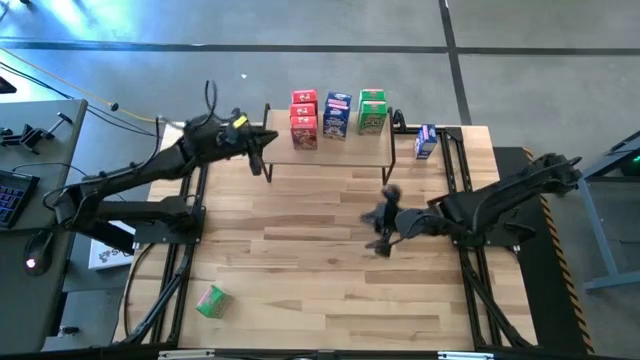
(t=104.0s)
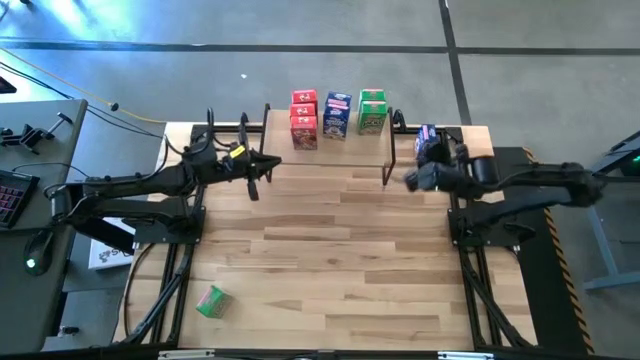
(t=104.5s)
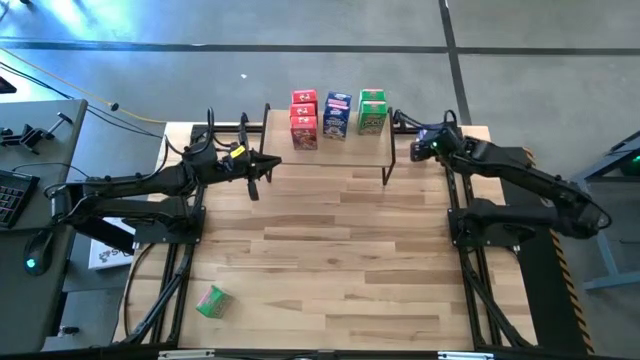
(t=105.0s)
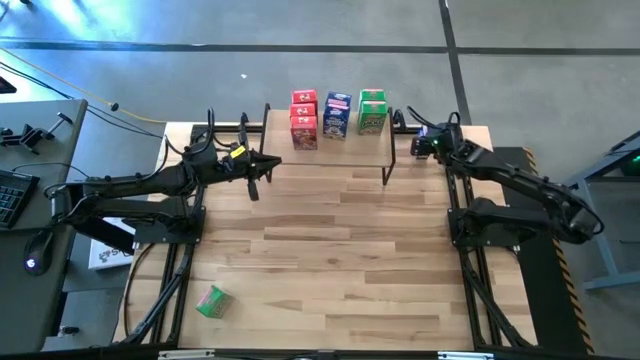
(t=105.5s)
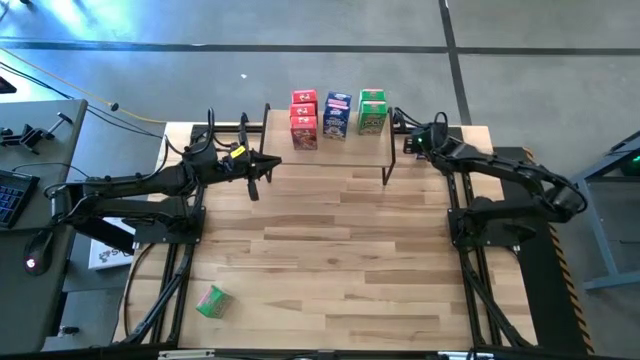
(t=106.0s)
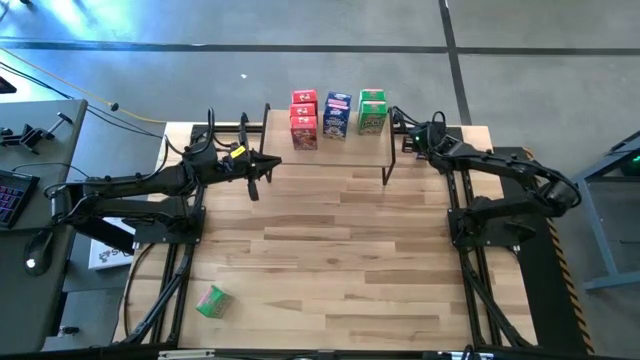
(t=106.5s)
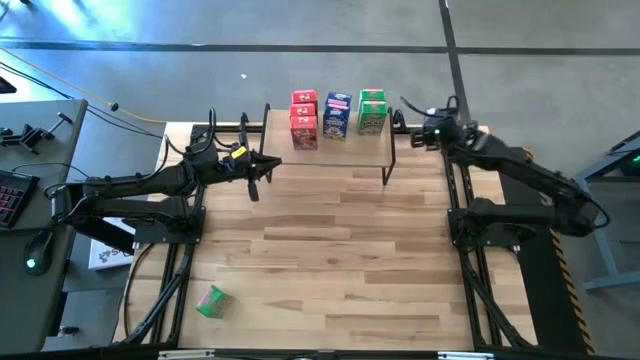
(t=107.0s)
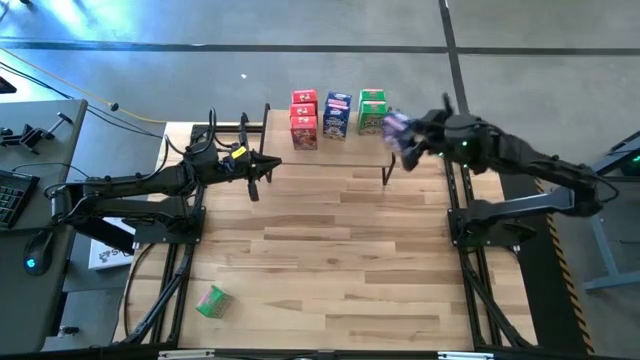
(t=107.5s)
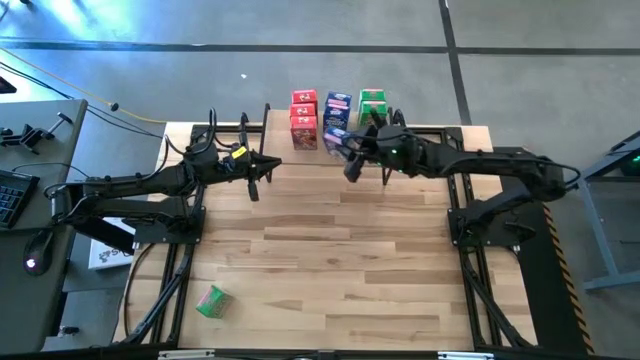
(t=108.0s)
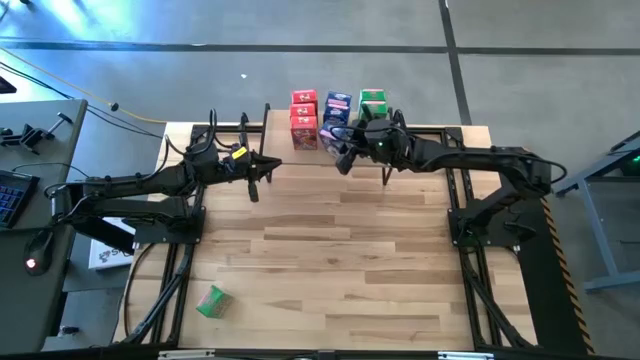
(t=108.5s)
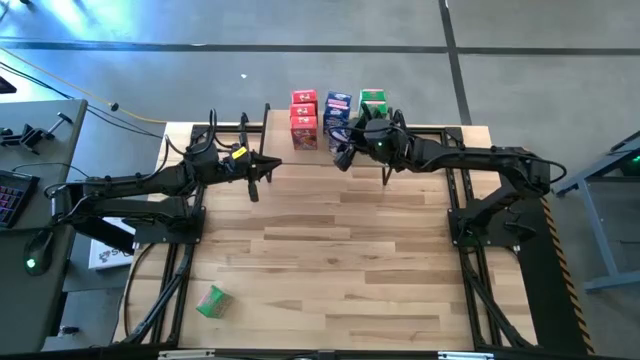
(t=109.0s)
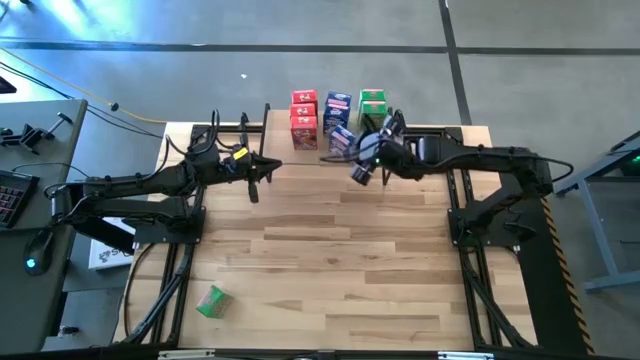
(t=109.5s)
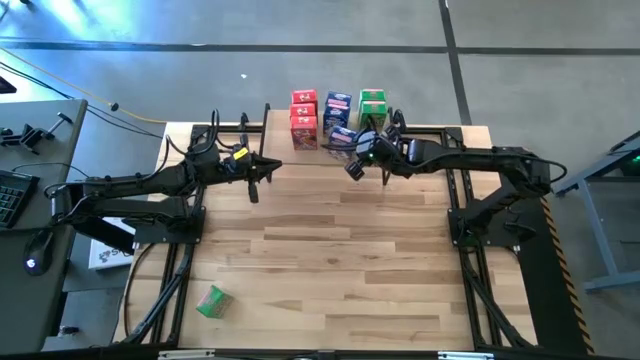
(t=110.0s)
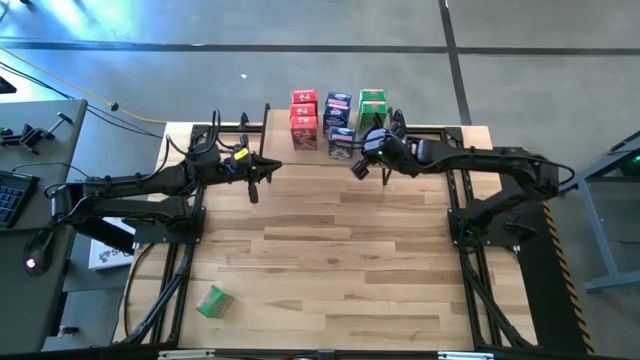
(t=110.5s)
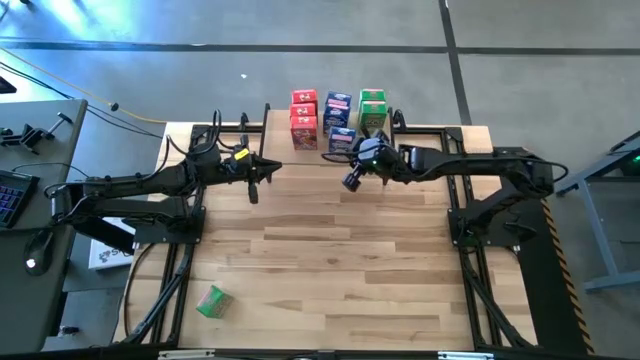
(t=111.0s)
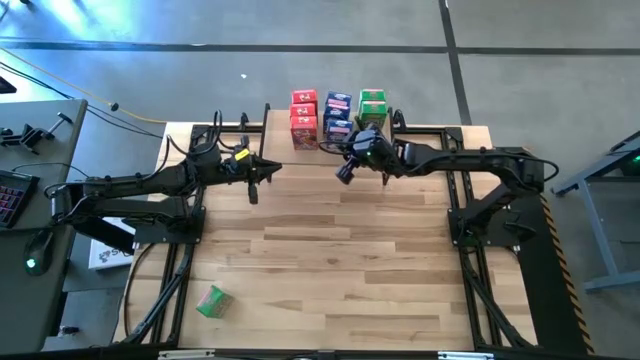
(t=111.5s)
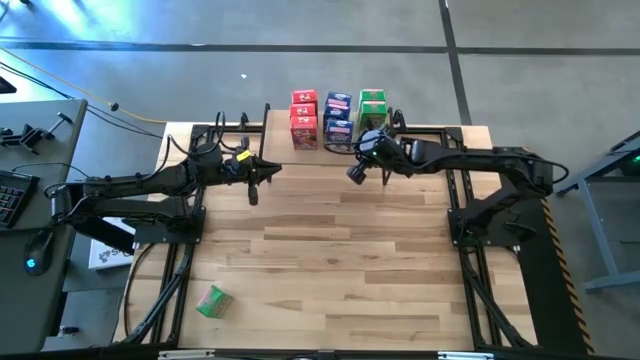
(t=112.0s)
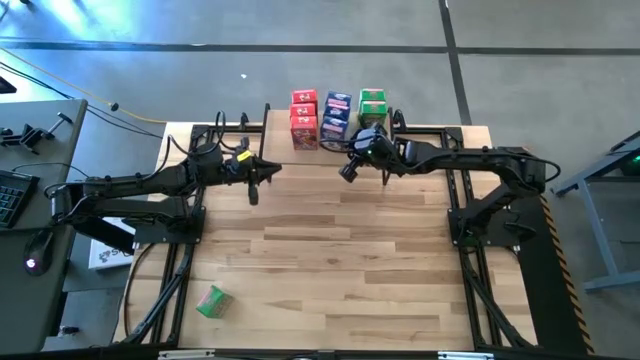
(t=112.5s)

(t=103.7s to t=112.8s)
Task: Stack cereal on shelf
Put the blue cereal box in front of the other blue cereal box on the shelf

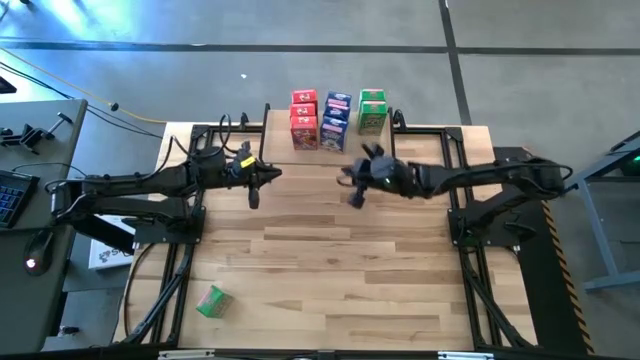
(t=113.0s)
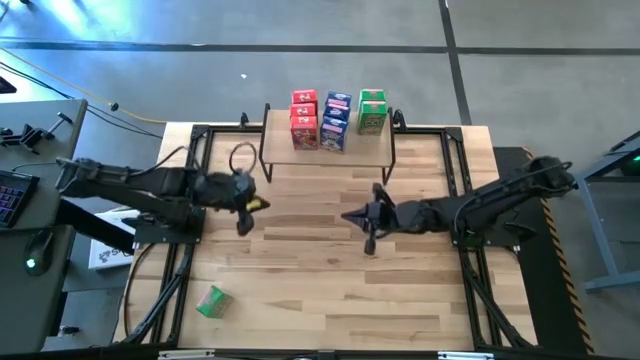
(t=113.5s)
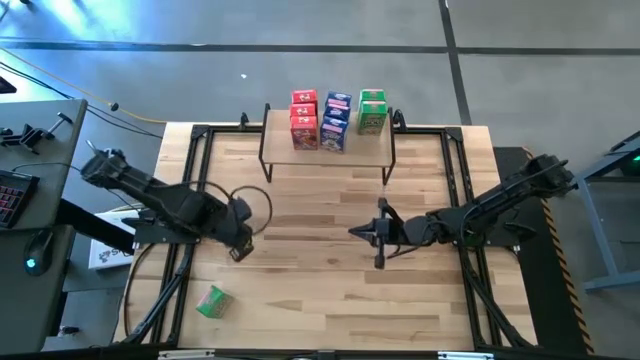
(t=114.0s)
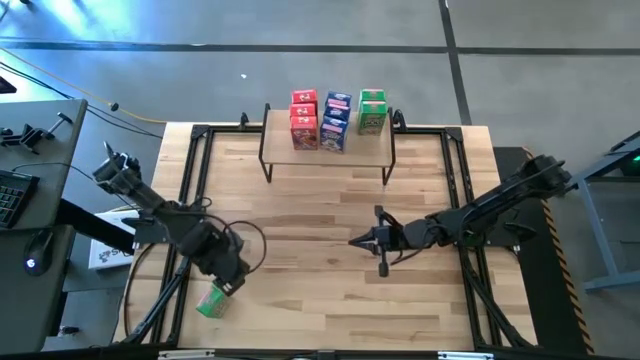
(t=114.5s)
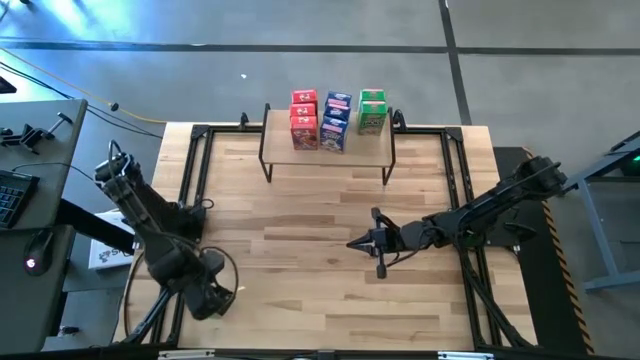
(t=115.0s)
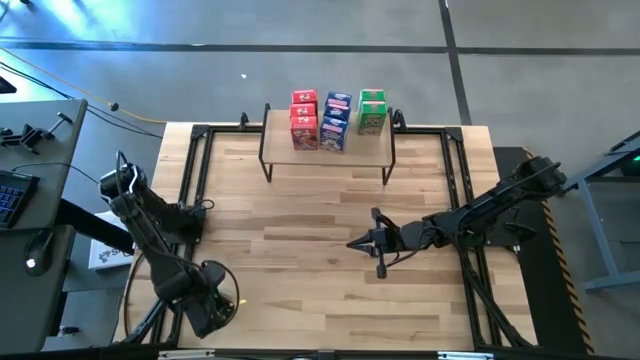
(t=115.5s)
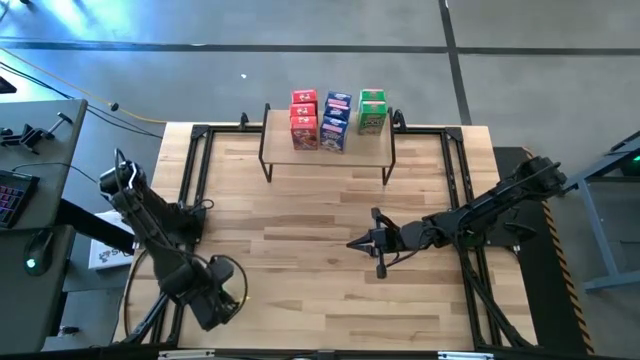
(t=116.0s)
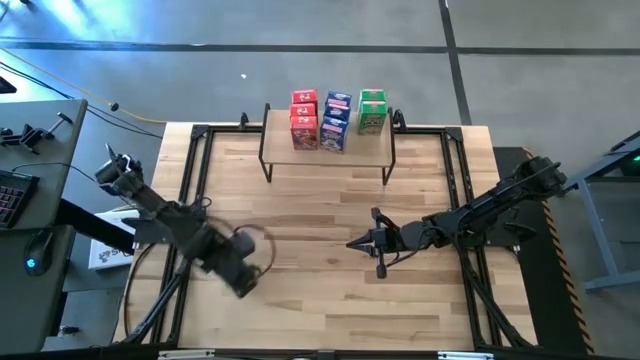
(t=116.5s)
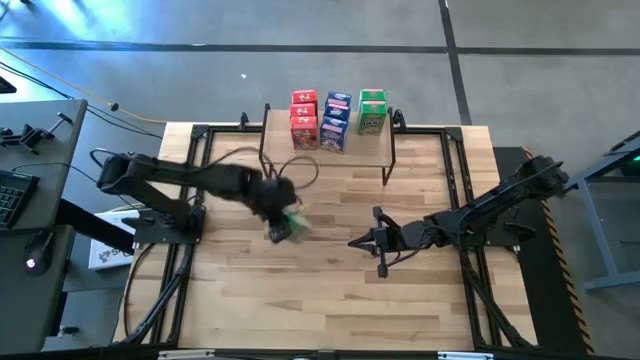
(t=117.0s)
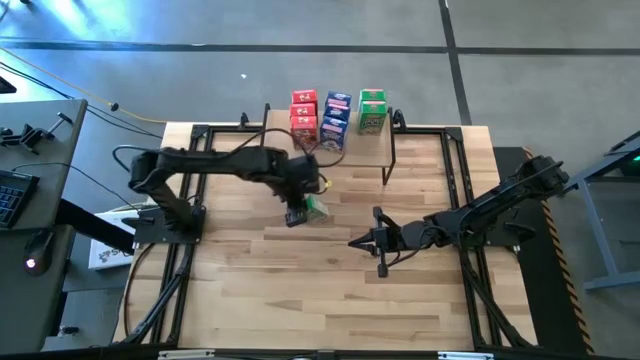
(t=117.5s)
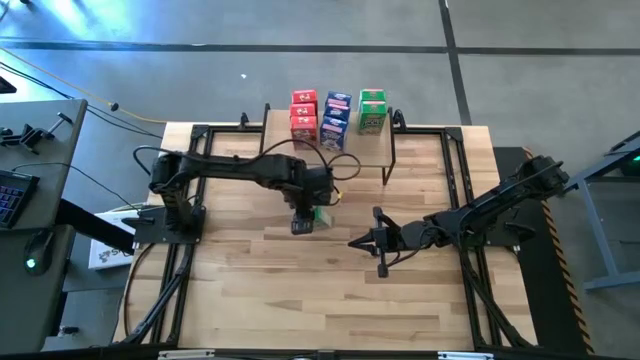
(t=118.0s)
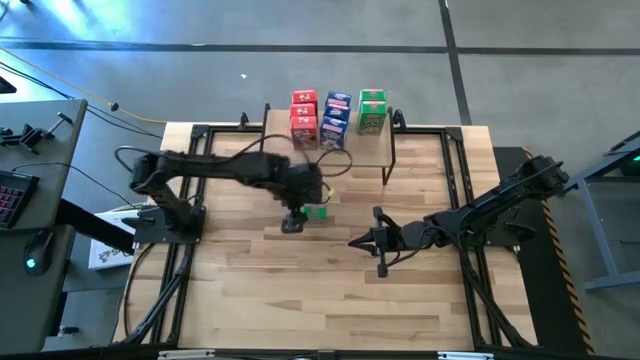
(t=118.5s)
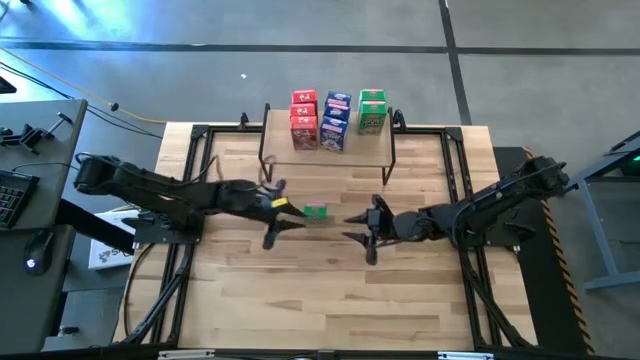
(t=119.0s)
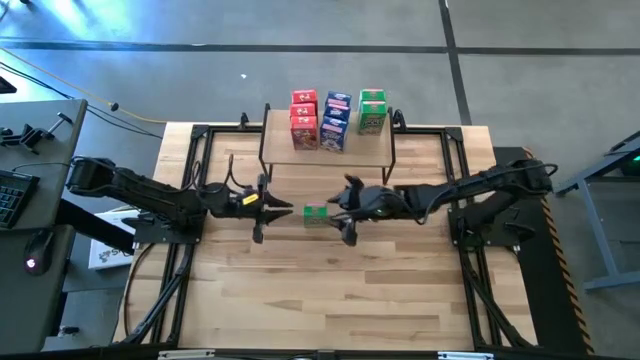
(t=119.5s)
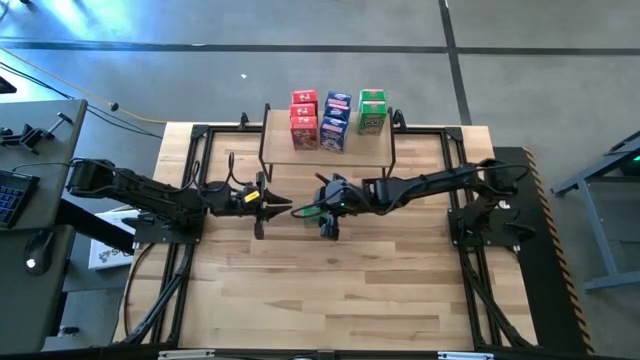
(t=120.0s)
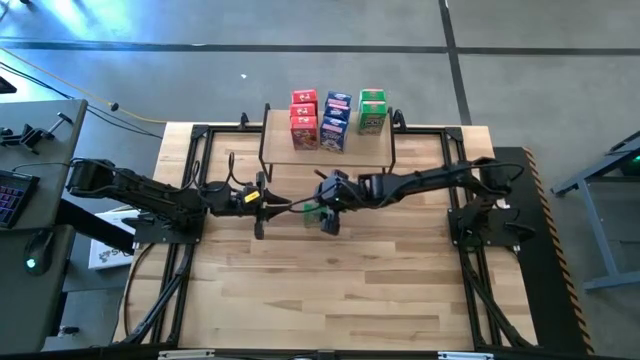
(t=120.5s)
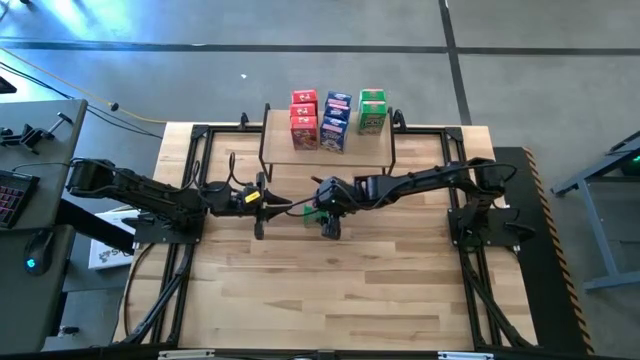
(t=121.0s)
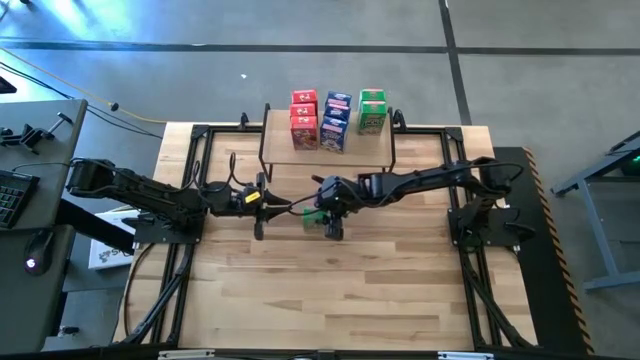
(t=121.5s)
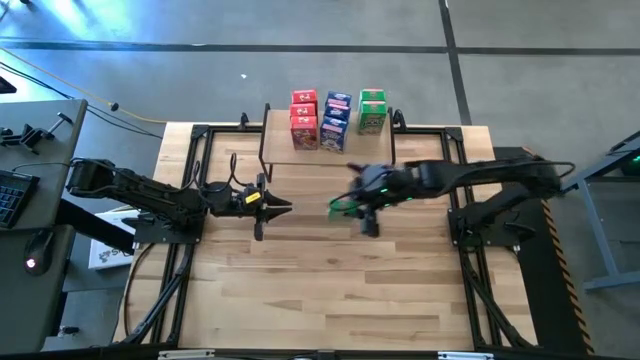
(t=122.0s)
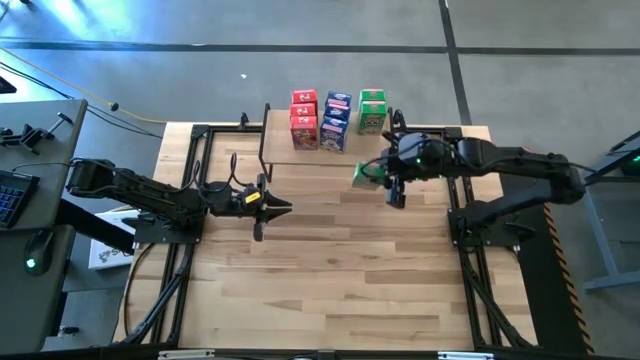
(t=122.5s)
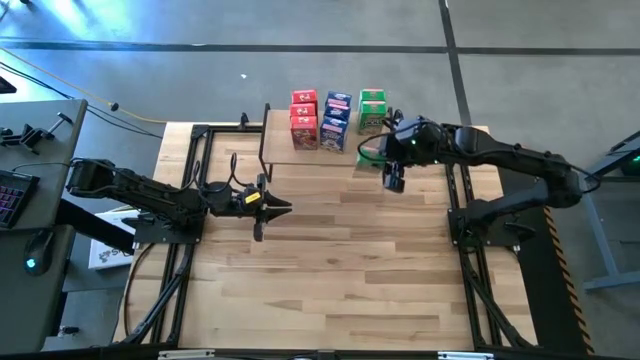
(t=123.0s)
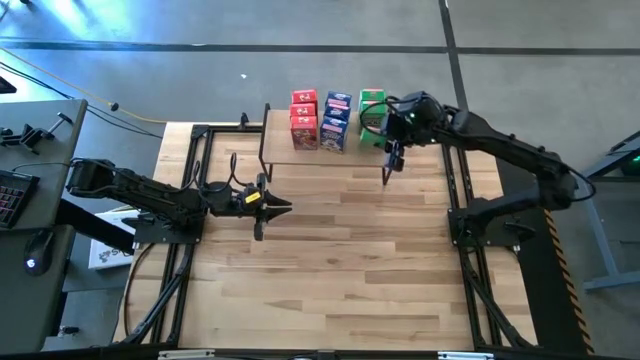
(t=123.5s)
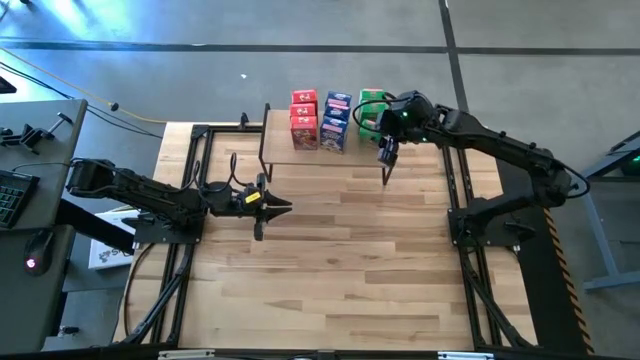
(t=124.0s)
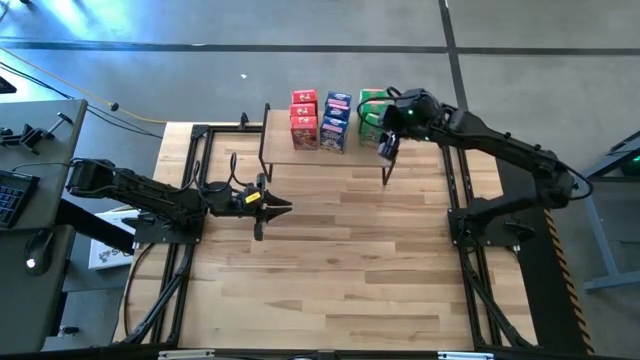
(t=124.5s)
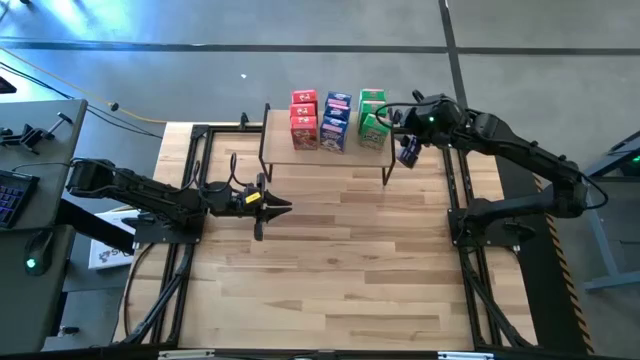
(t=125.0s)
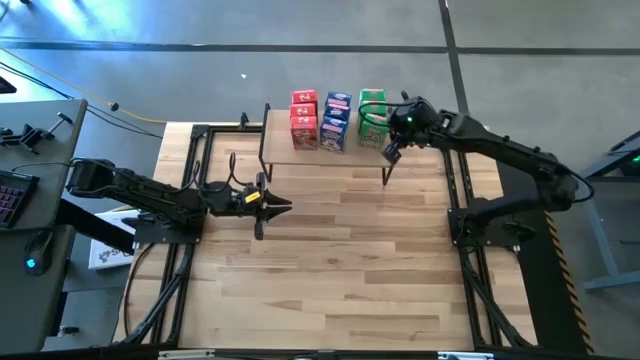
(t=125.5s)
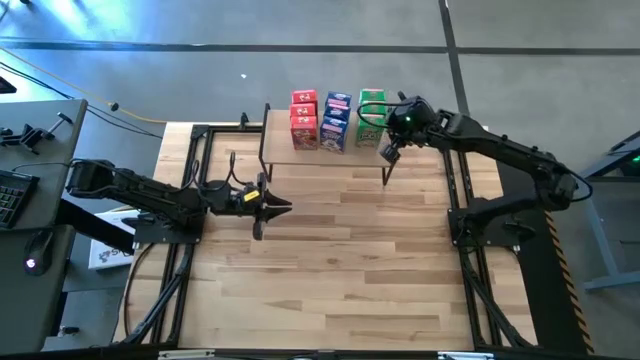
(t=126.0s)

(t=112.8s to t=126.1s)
Put the green cereal box in front of the other green cereal box on the shelf
